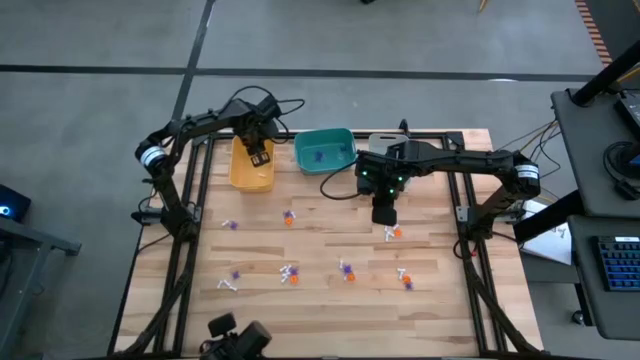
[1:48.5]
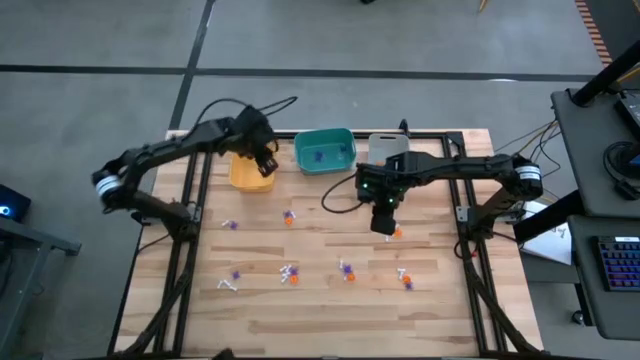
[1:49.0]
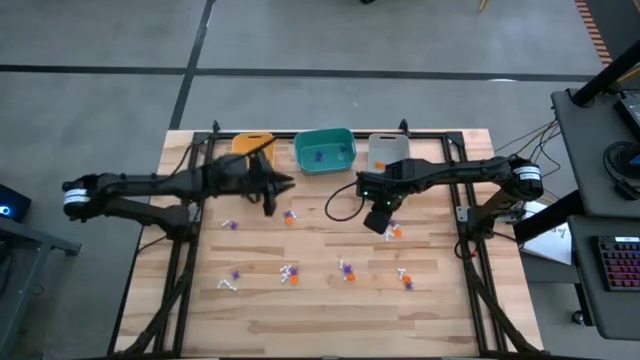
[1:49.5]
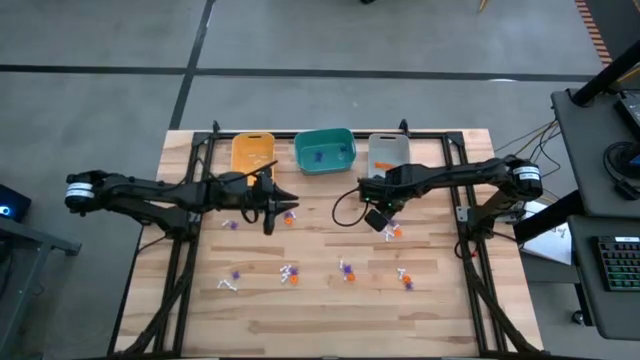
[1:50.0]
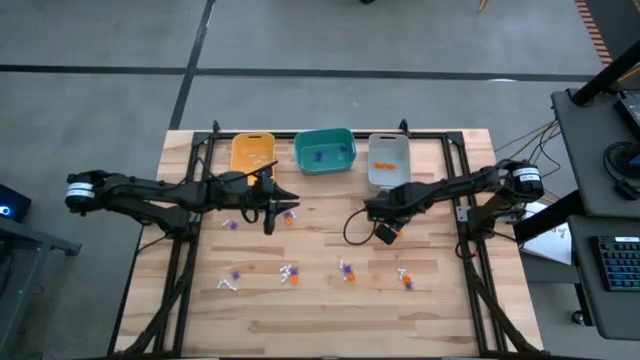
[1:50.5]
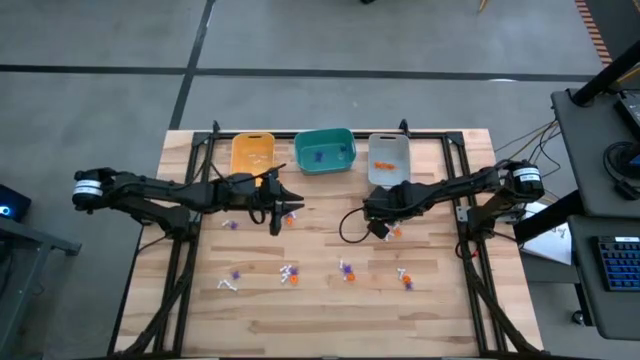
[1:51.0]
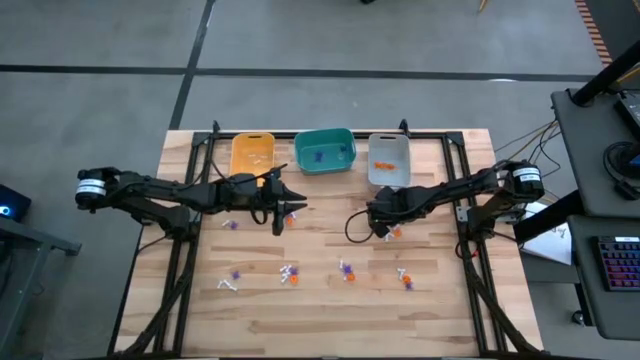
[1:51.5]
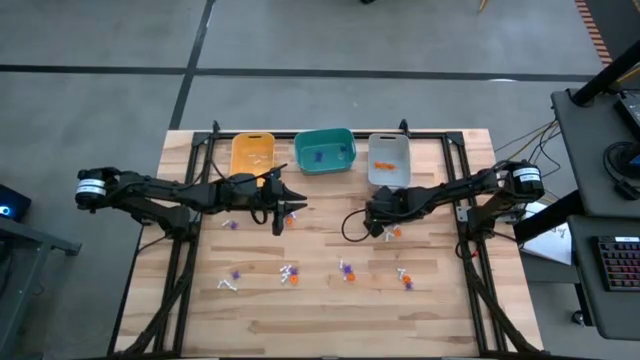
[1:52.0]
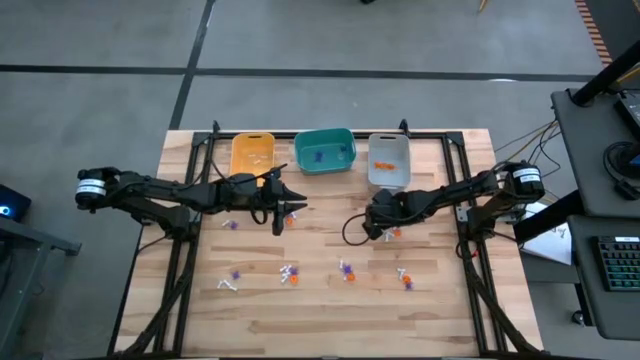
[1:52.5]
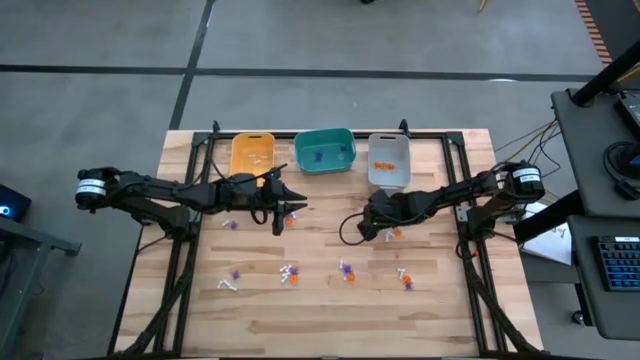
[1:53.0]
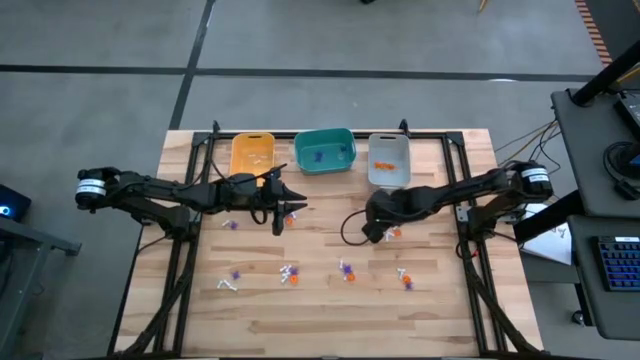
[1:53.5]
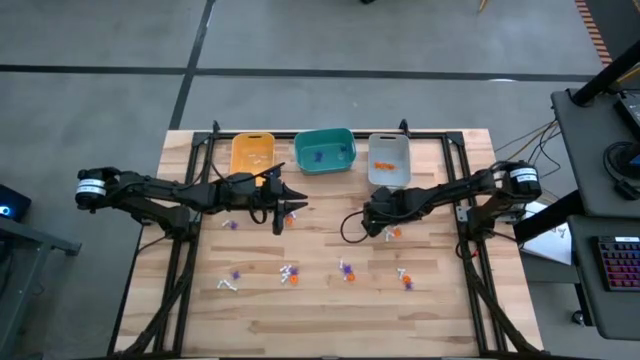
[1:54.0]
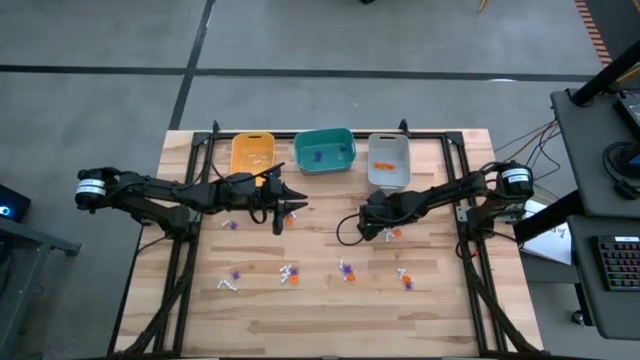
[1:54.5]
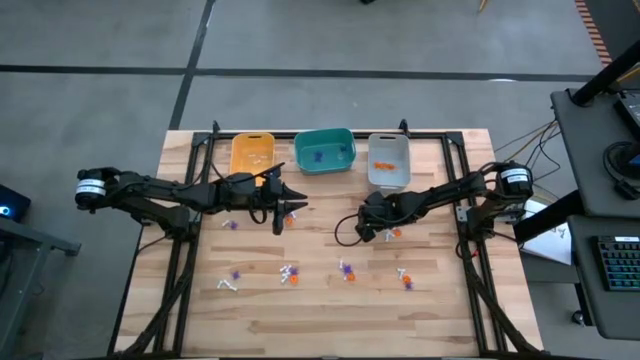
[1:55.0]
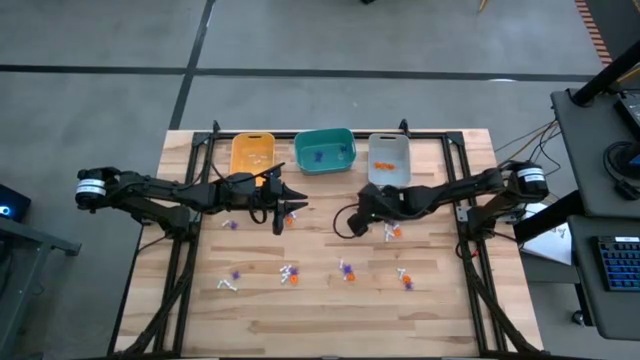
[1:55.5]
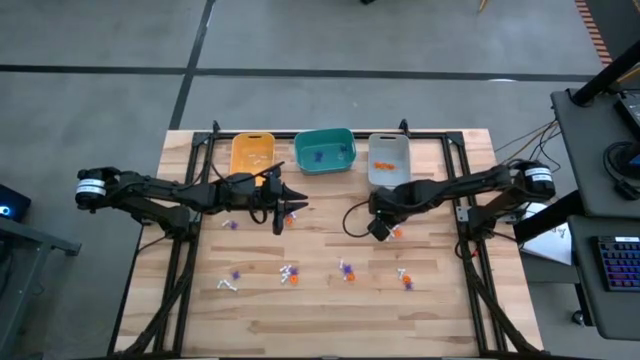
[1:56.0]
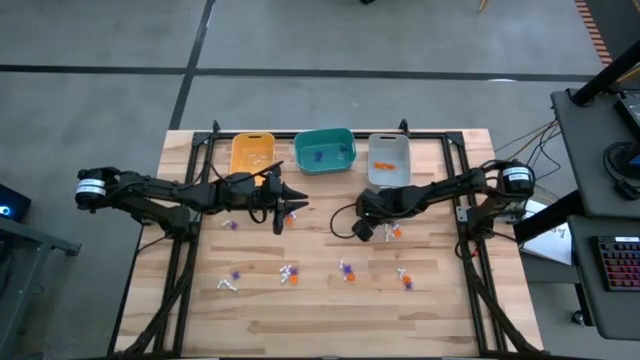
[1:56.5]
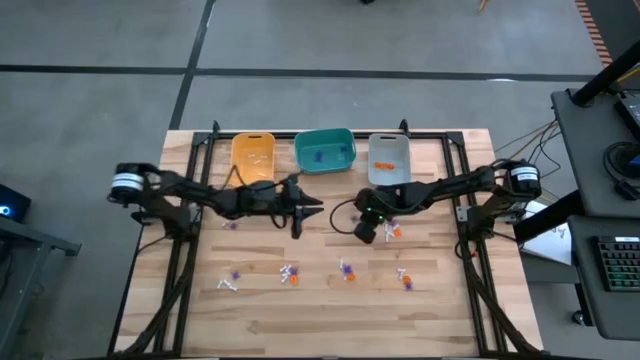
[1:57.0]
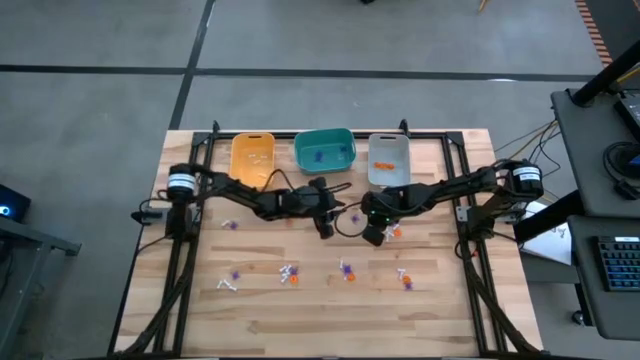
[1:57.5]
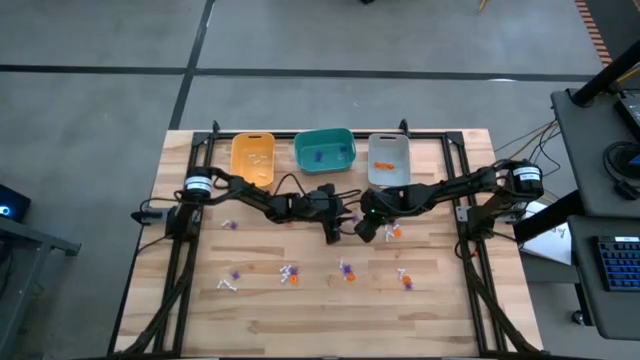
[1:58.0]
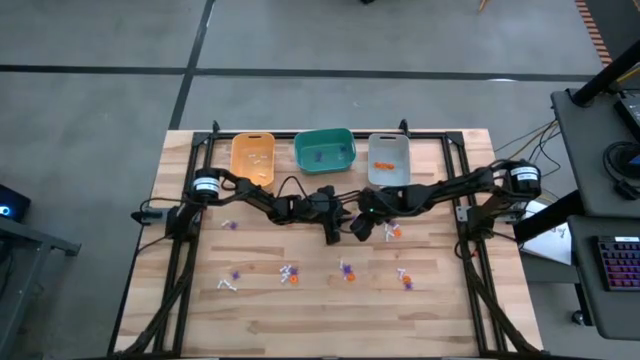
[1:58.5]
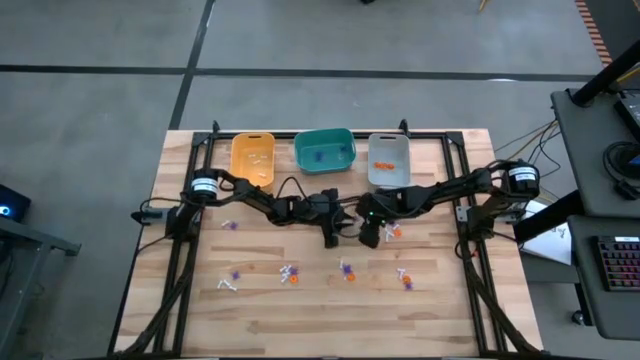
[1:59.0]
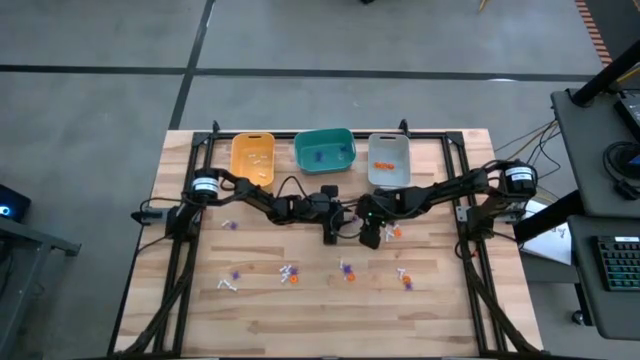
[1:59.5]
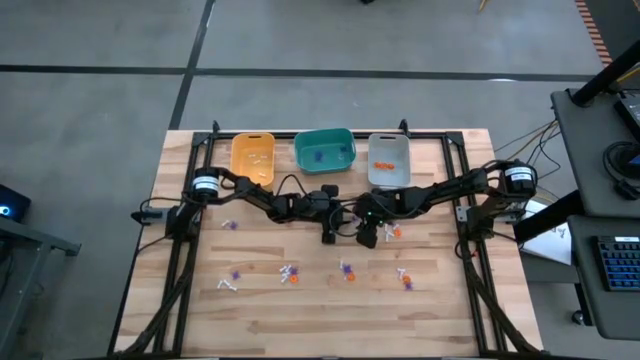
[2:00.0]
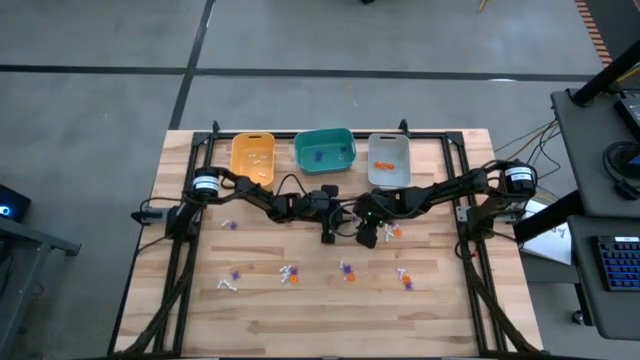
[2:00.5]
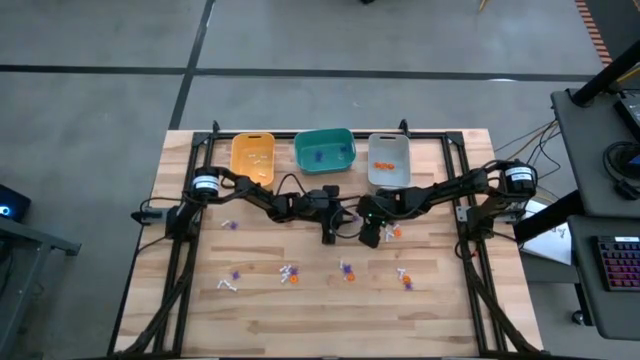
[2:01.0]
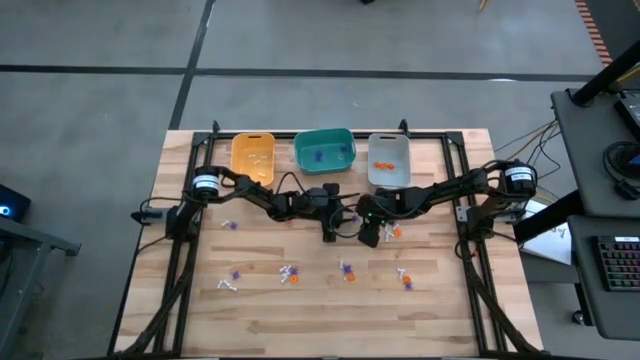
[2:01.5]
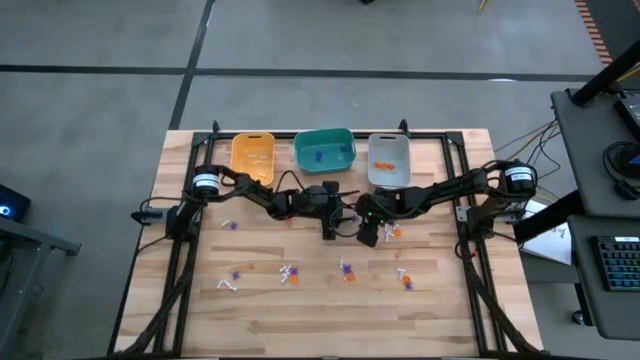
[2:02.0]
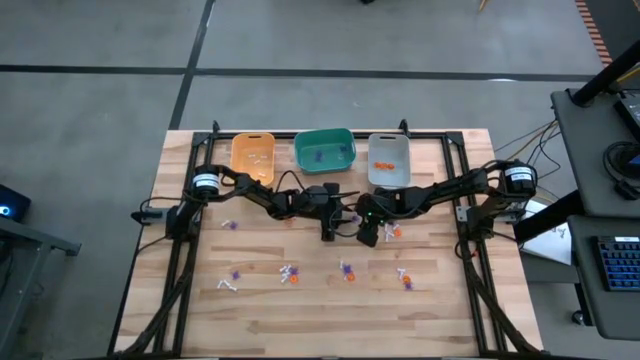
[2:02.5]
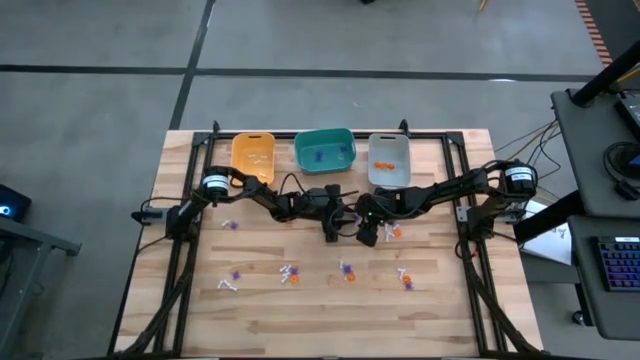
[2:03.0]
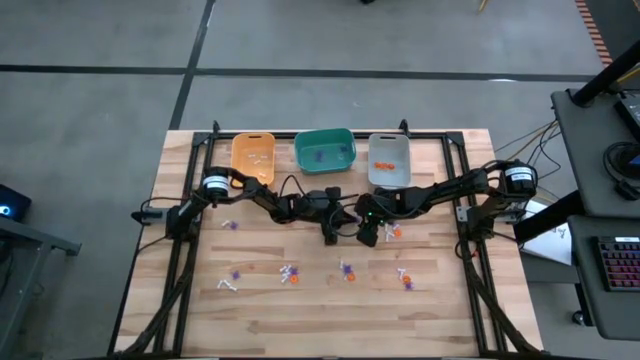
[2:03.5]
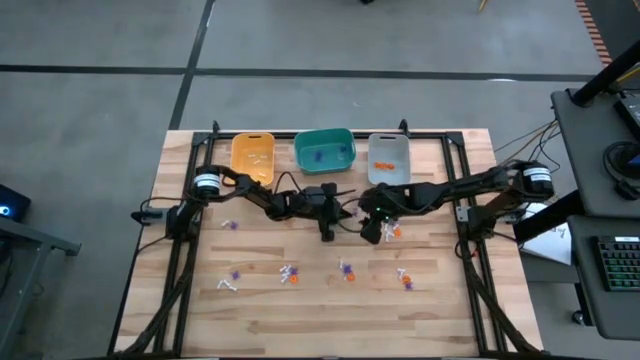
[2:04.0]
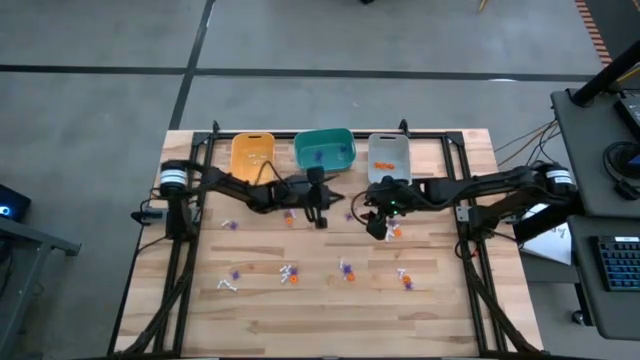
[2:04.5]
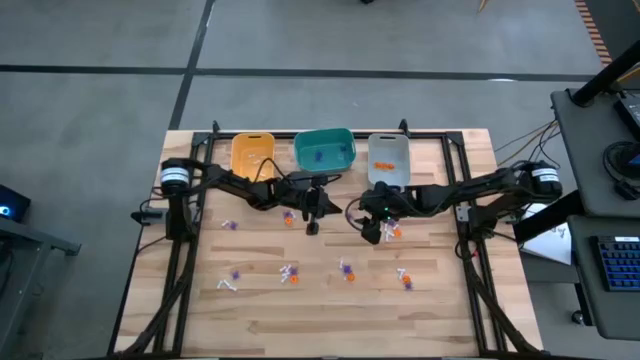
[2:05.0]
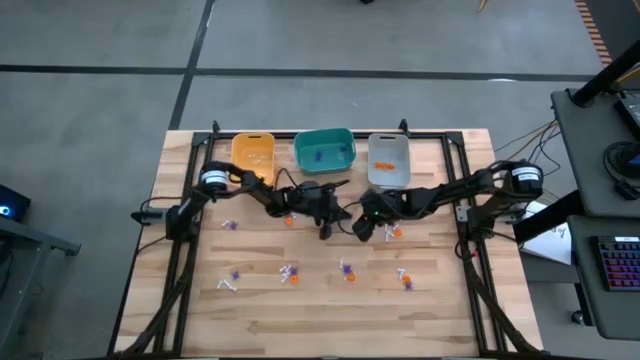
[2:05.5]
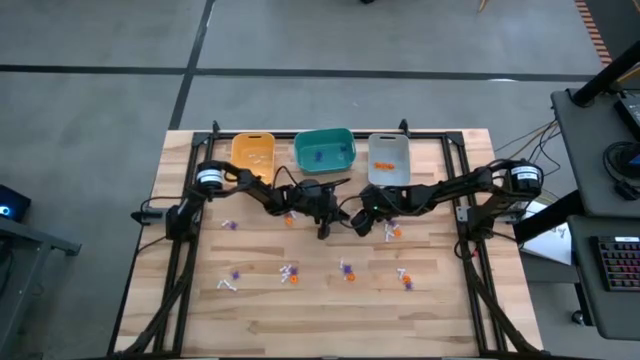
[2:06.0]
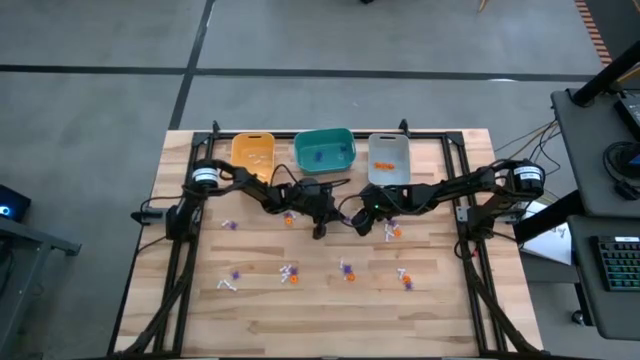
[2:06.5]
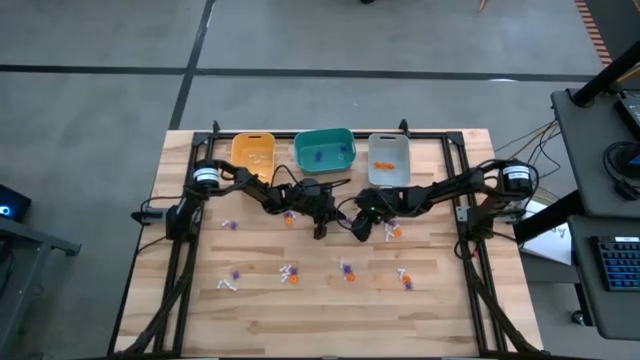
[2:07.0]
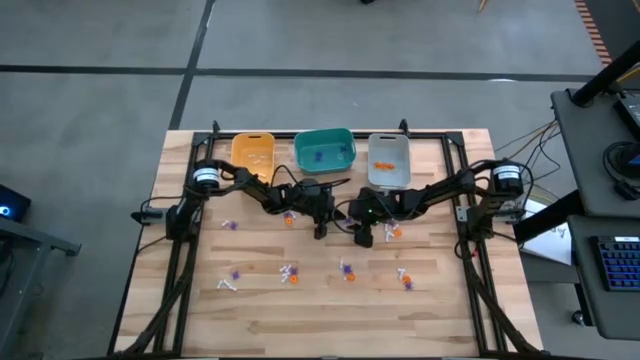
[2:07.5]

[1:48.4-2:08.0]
Task: Sort Halloween decoration
Put the small violet spider toy into the green bin

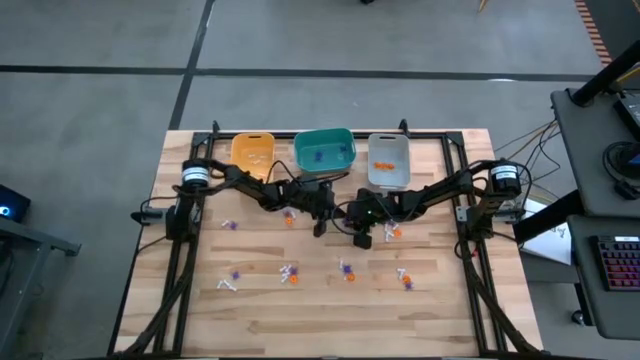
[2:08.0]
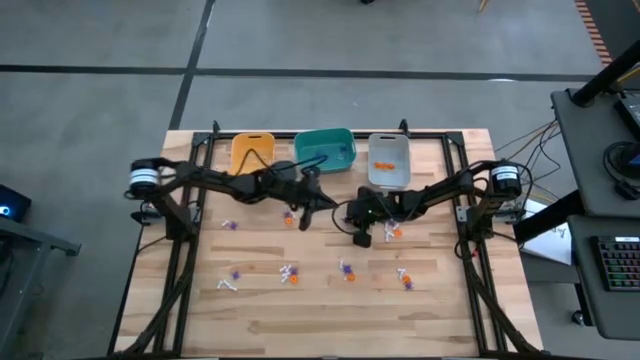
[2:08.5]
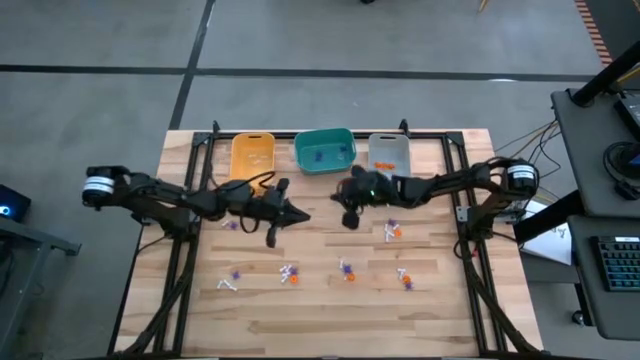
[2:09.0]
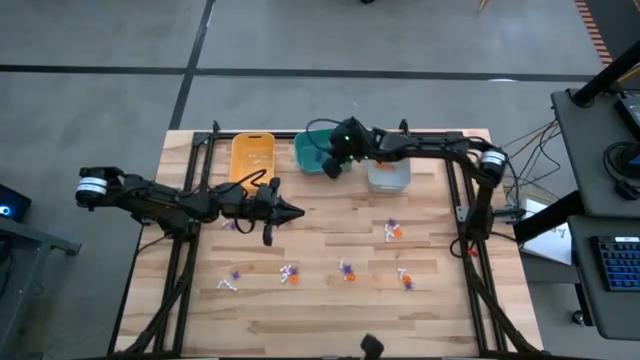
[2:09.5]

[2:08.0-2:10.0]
Put the violet spider toy into the green bin
